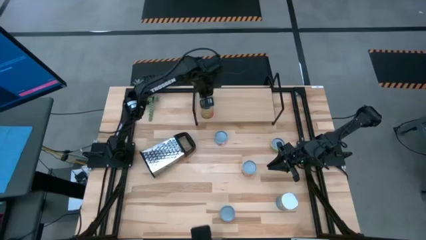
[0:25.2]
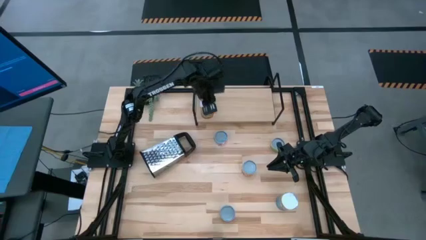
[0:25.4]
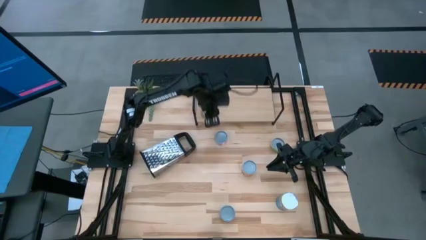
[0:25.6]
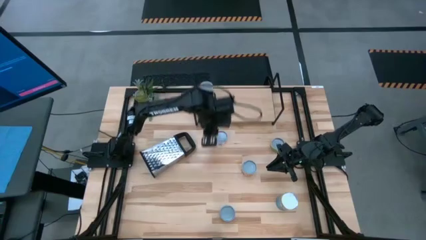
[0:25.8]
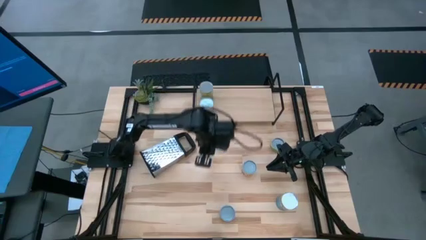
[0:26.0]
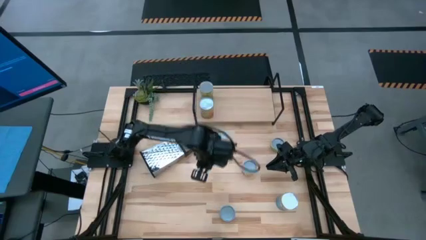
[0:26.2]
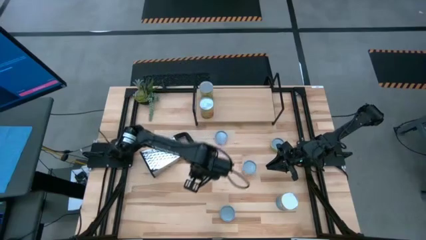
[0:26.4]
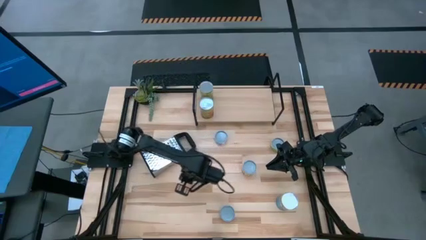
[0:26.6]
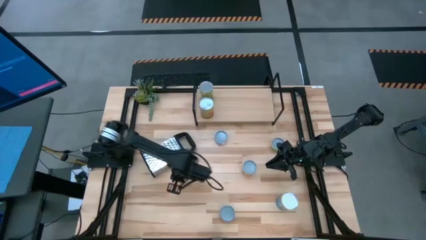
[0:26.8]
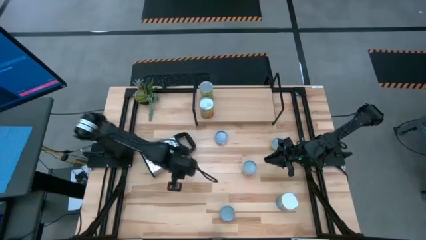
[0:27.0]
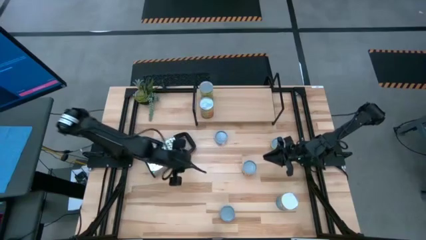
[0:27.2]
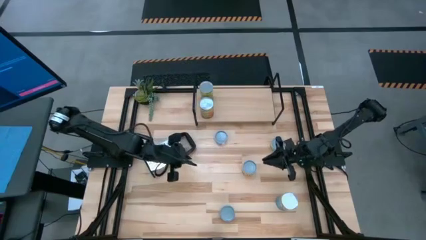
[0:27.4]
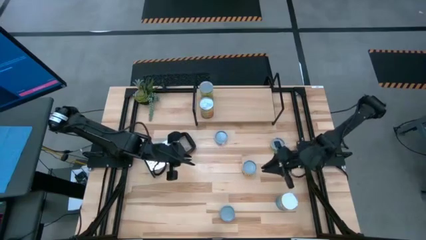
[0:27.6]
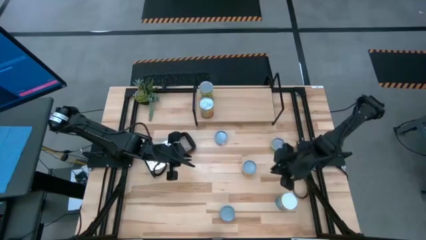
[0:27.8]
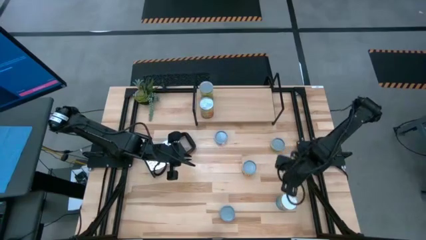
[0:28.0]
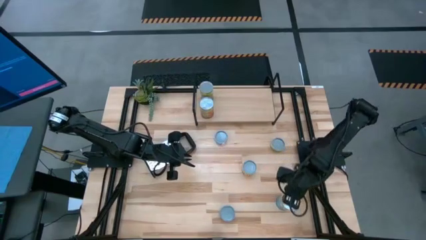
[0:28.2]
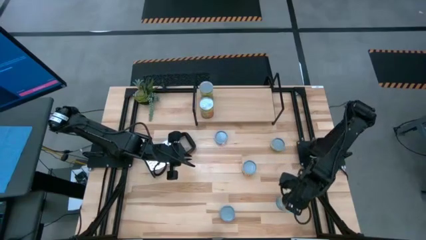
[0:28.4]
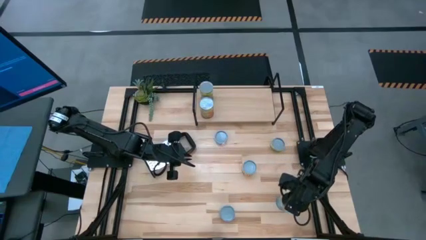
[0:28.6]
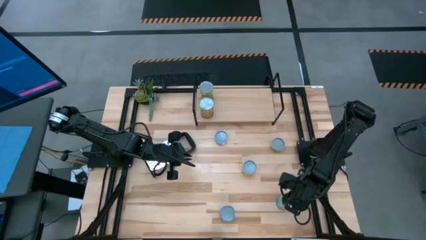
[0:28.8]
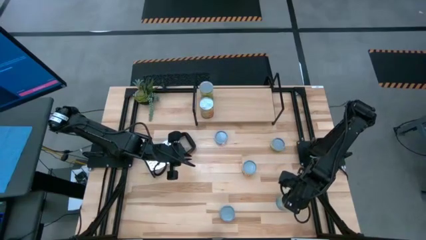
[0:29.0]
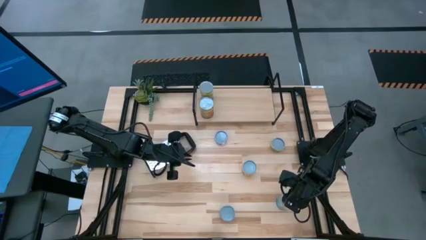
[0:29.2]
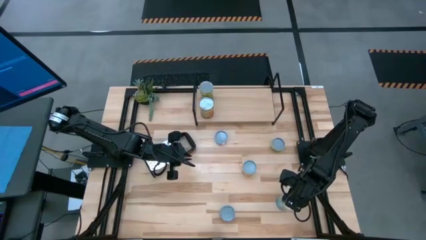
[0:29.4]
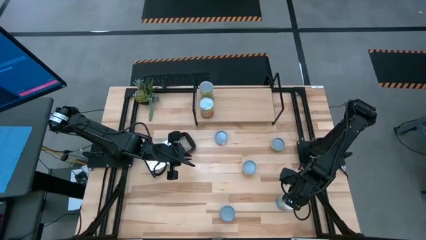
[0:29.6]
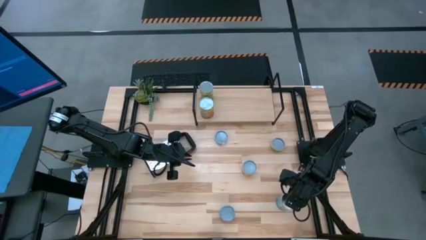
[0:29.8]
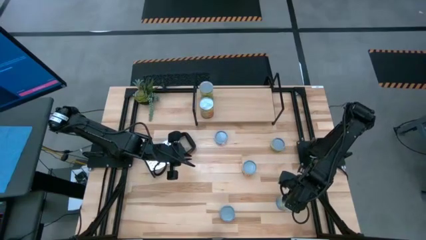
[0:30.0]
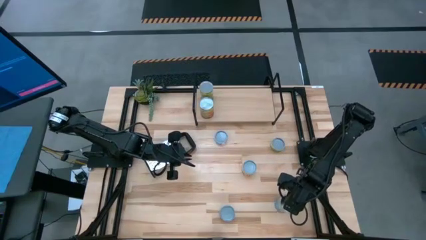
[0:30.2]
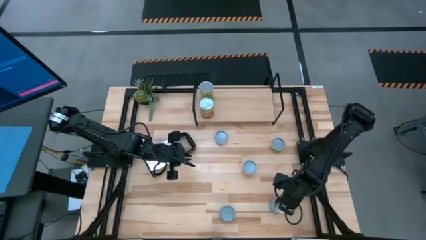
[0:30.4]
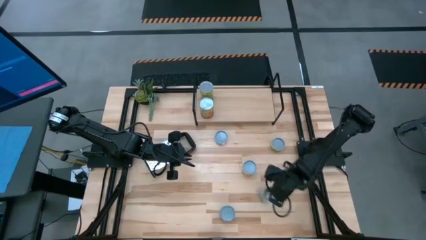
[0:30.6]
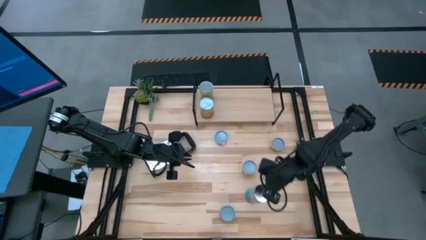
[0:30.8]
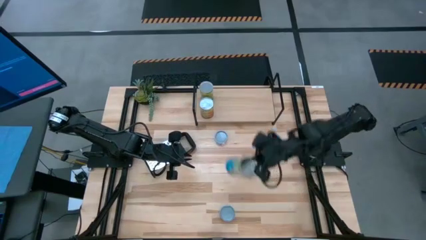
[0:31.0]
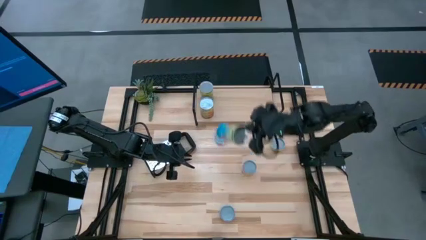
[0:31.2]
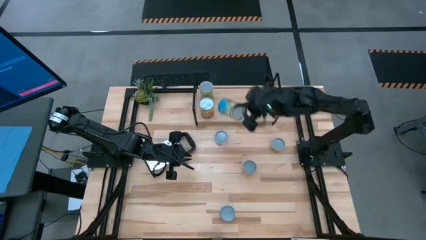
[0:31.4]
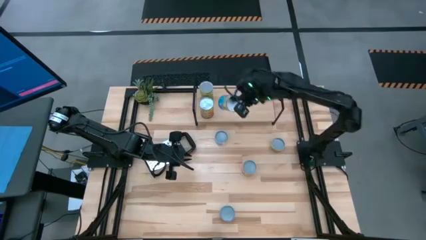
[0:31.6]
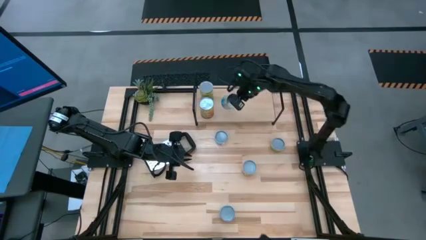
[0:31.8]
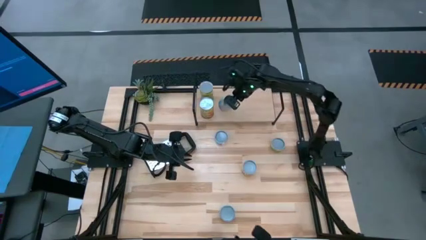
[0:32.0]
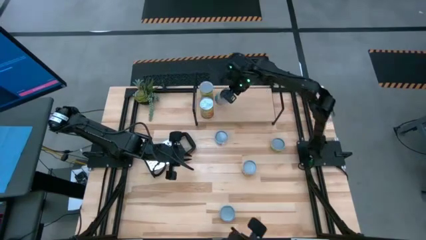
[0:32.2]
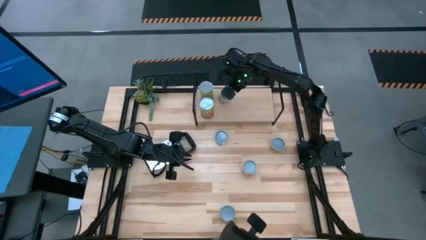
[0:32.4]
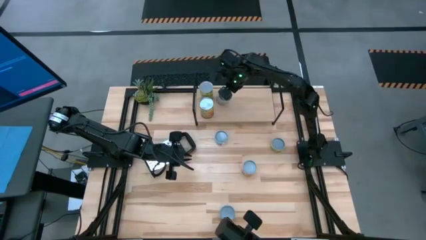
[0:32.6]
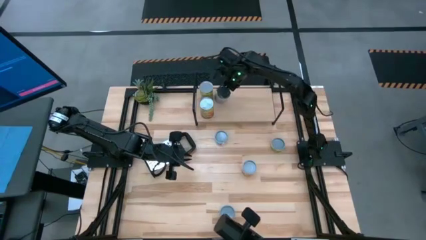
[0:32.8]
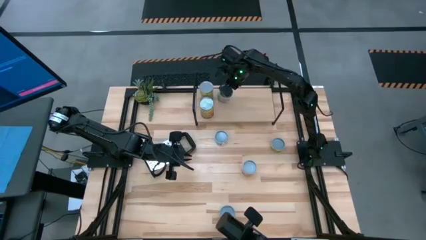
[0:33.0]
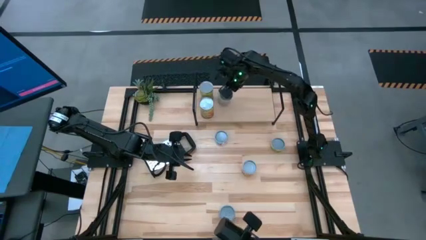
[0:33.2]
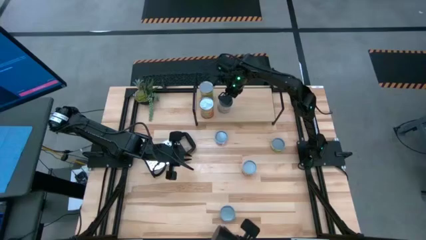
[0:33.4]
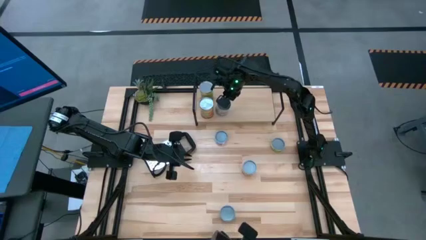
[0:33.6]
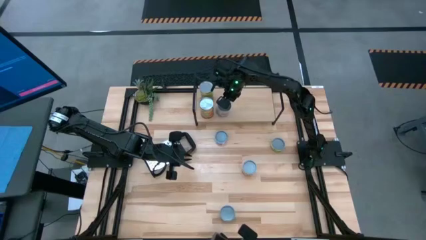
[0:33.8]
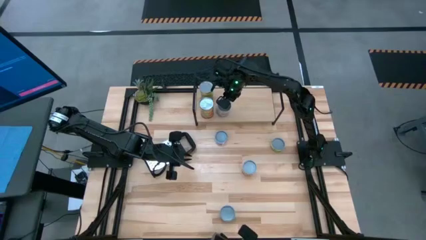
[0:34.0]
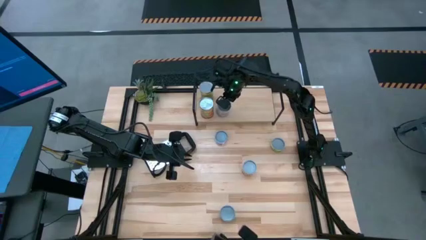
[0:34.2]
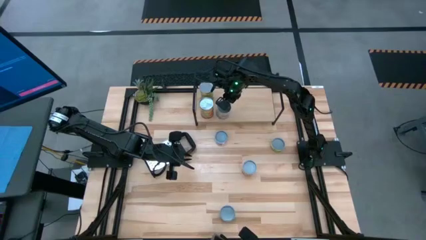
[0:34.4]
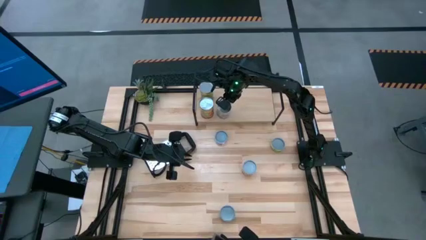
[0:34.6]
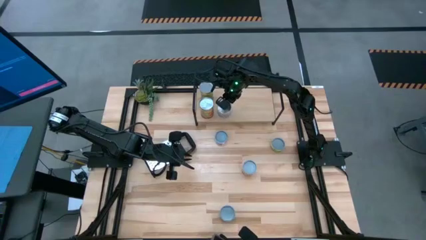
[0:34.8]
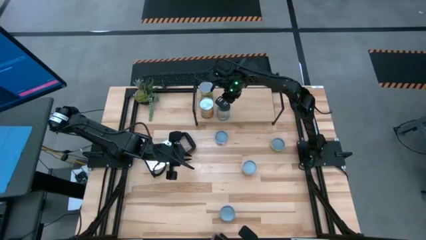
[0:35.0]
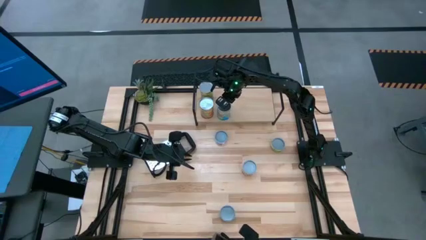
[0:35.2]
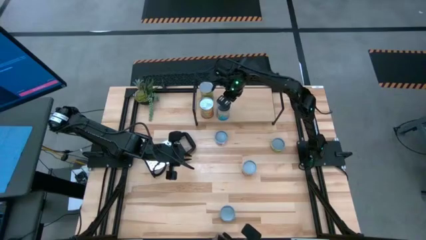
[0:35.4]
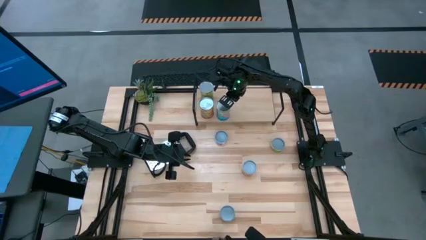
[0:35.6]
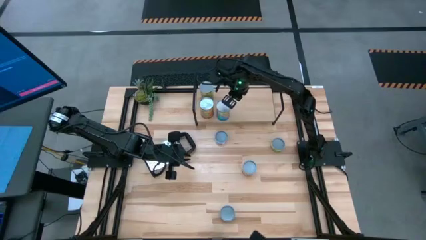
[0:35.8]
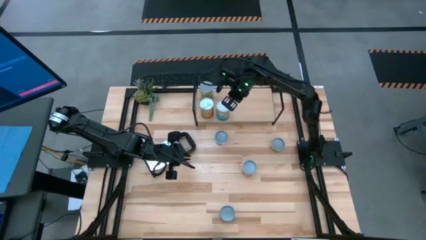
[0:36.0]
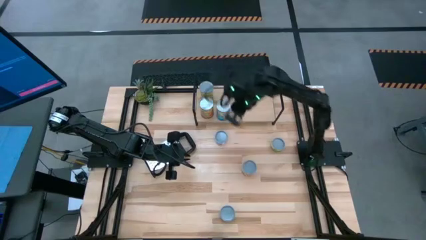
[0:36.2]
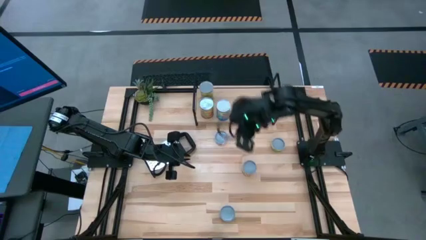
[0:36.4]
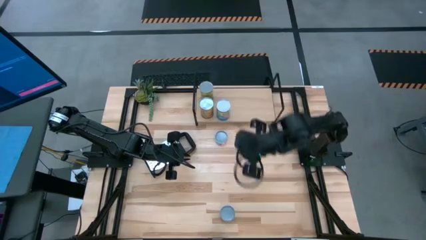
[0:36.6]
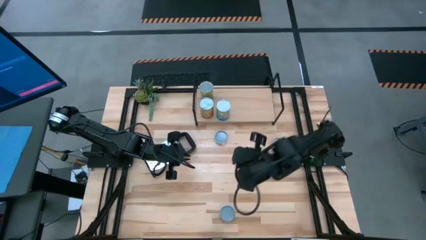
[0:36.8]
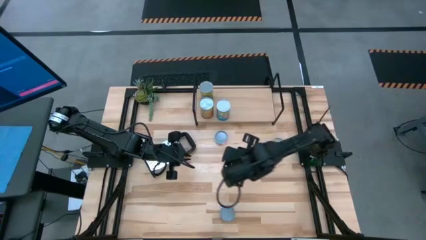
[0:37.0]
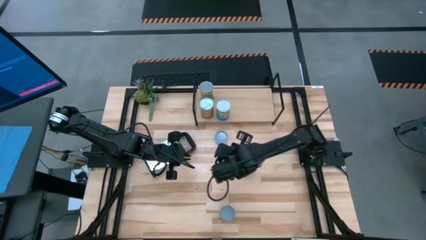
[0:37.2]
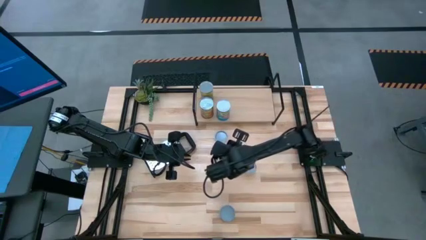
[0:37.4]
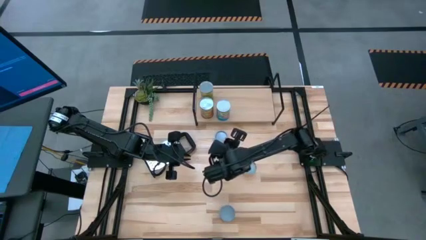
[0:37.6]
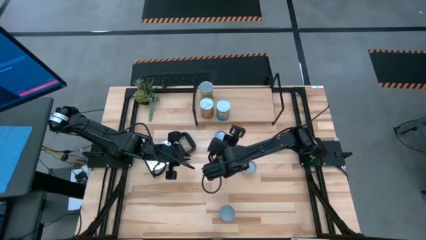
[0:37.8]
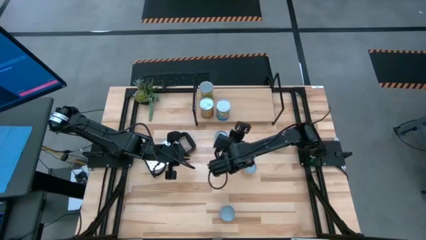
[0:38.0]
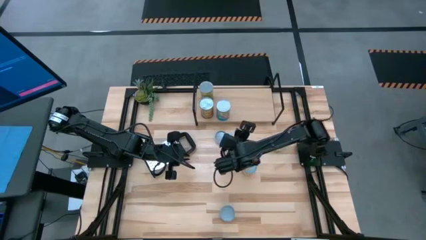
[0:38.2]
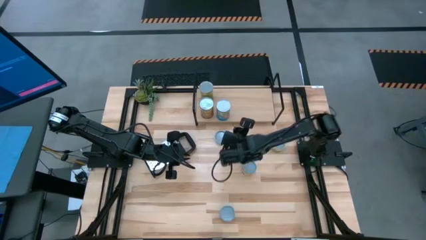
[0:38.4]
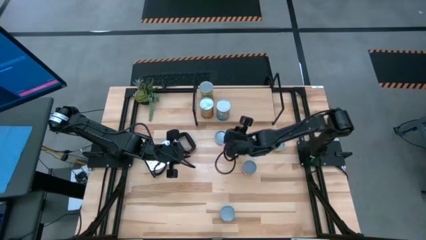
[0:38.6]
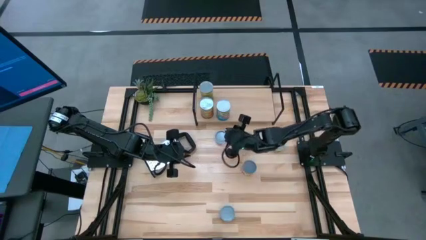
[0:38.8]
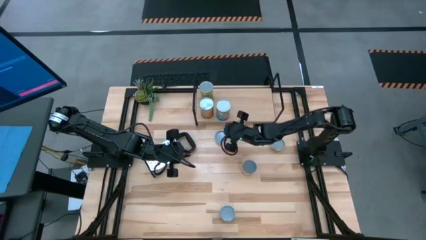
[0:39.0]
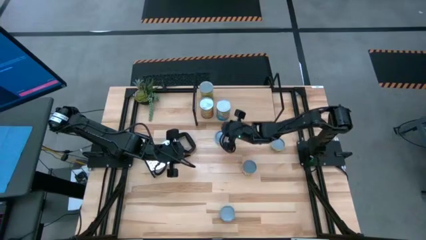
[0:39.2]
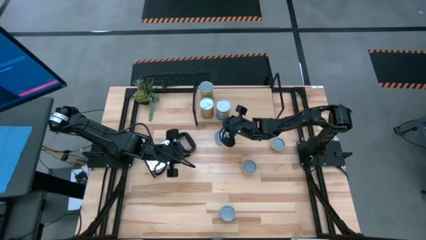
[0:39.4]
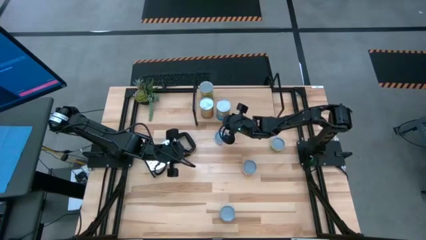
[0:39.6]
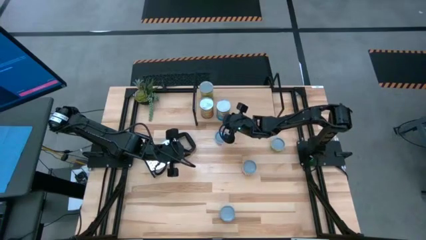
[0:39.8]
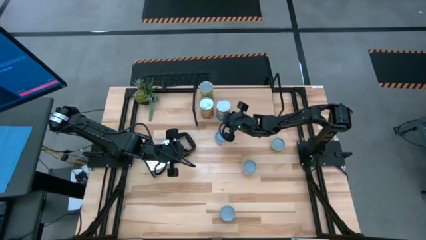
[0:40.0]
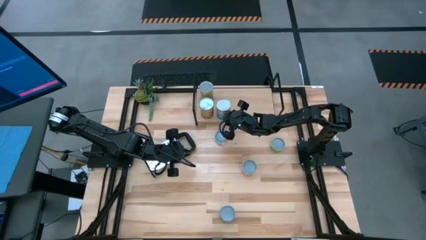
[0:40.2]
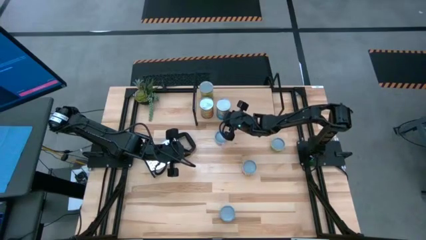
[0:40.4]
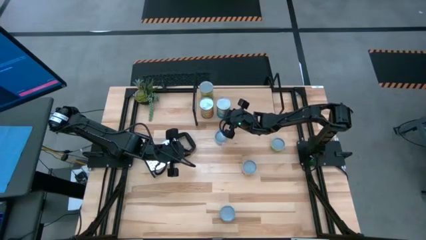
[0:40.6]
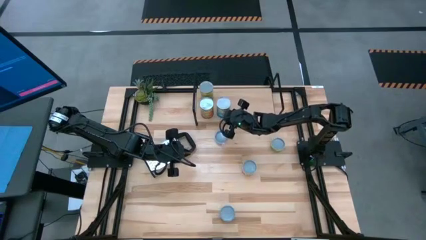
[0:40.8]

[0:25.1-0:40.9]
Task: Pick and place cans onto a shelf
Put the canned tomatoes on the shelf

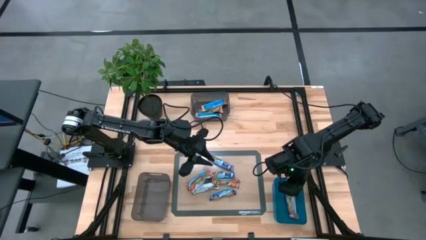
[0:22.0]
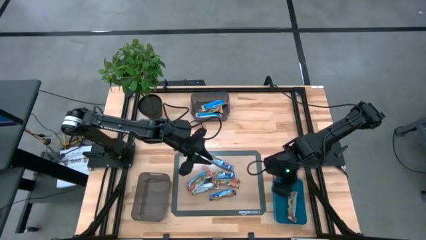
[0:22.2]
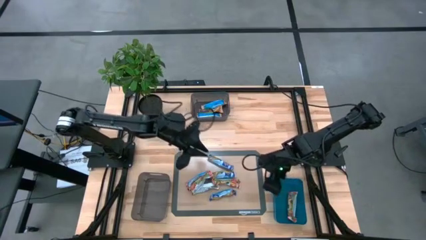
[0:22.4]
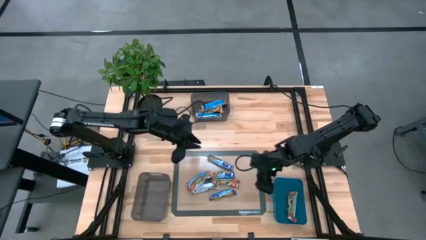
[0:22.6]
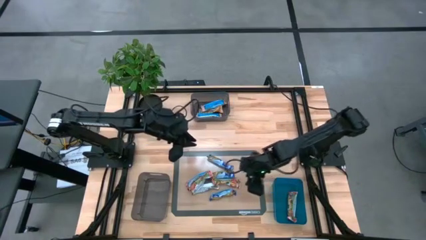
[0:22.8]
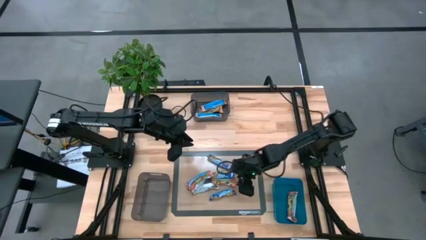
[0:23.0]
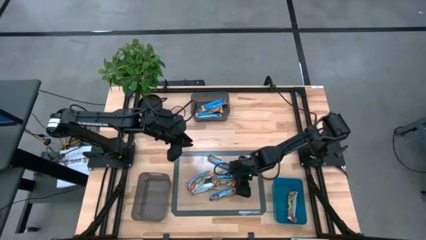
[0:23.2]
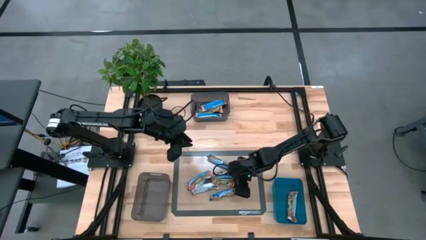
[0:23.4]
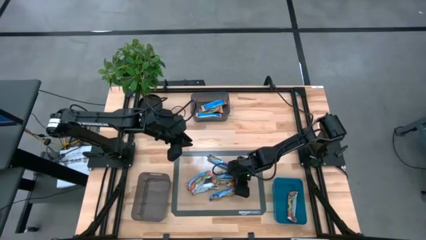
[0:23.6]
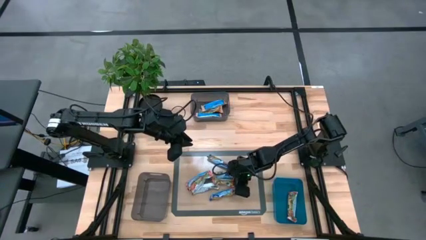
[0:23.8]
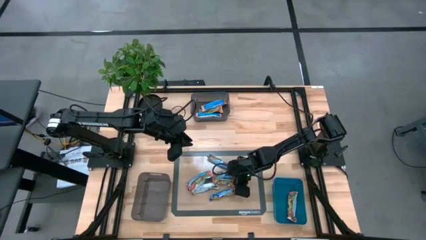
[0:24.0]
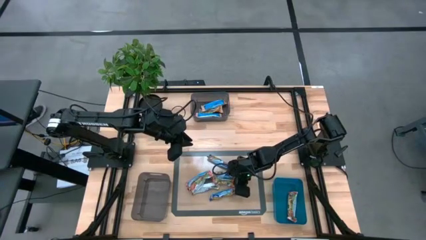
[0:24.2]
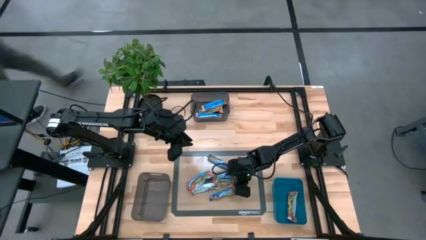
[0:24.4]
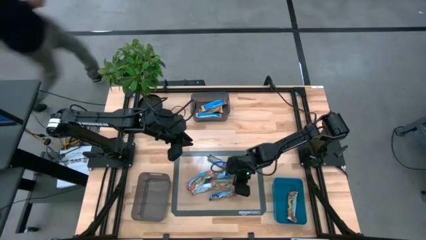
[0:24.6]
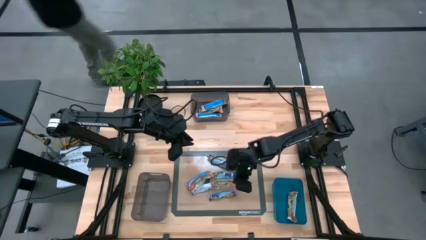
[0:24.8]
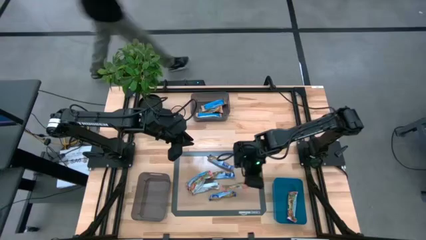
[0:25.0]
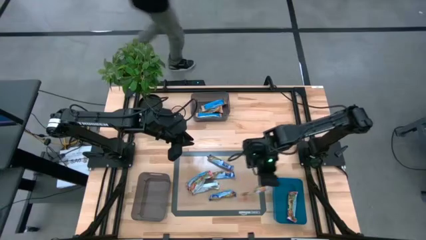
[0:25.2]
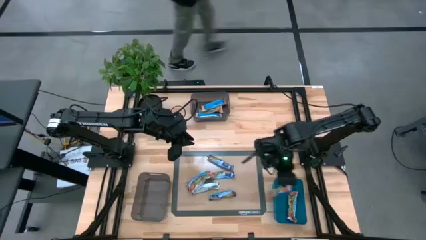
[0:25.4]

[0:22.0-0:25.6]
Task: Pick and place Granola Bars by type
Put the red granola bar into the blue bin
